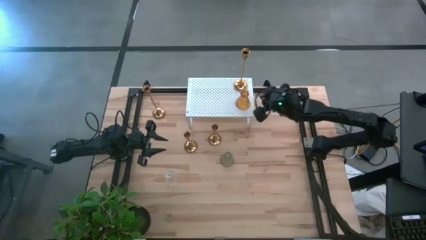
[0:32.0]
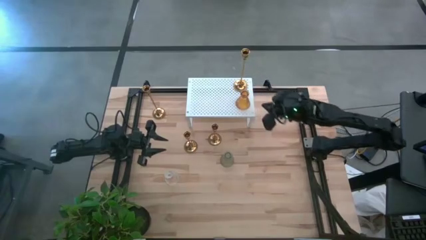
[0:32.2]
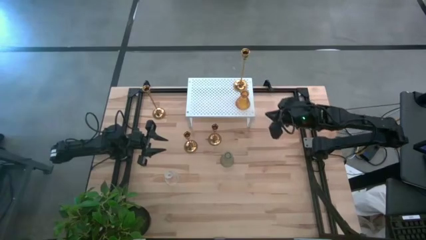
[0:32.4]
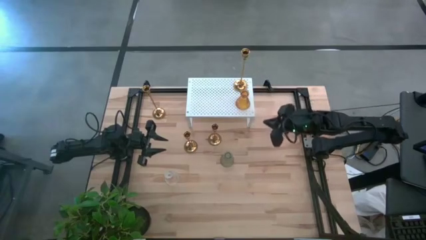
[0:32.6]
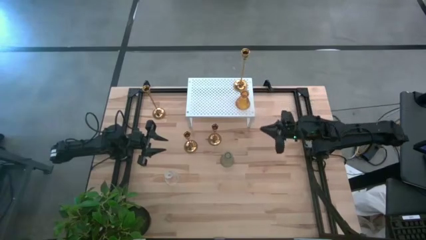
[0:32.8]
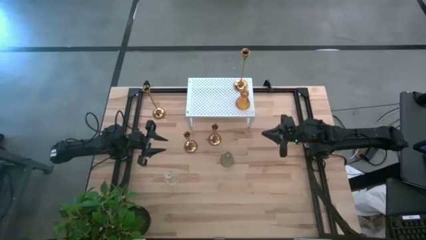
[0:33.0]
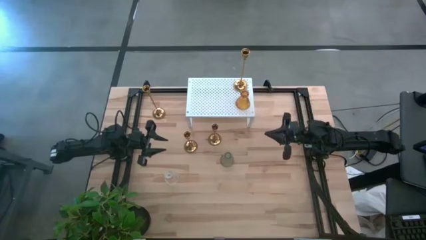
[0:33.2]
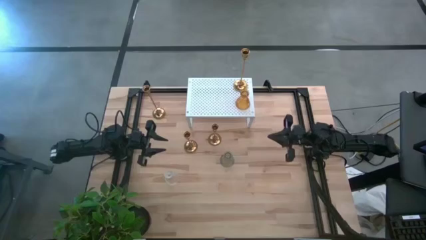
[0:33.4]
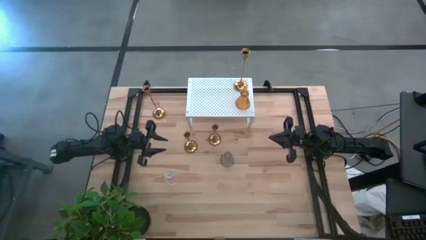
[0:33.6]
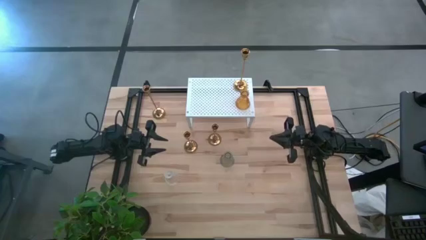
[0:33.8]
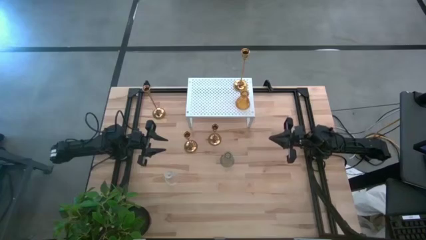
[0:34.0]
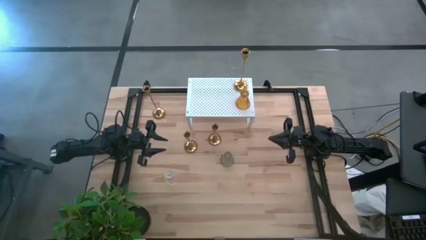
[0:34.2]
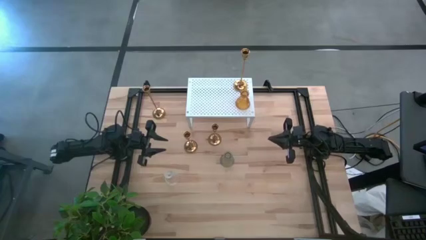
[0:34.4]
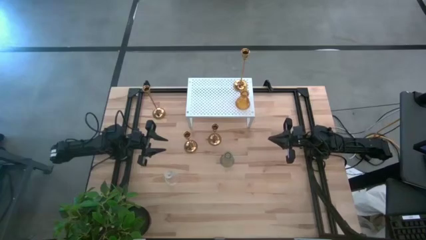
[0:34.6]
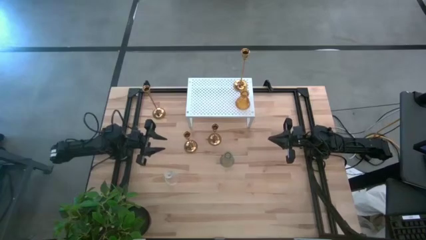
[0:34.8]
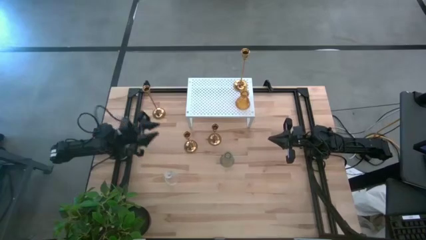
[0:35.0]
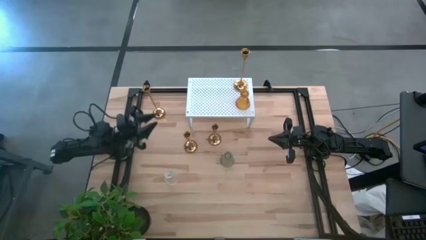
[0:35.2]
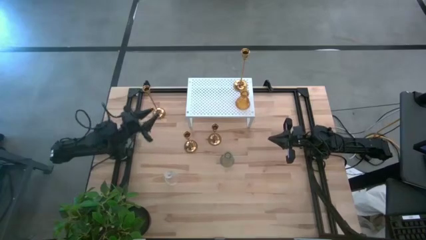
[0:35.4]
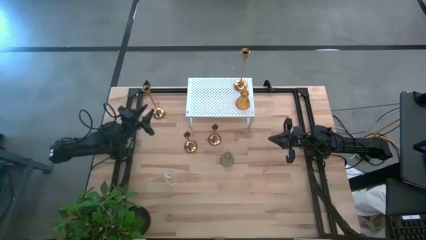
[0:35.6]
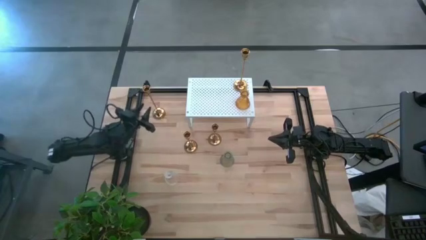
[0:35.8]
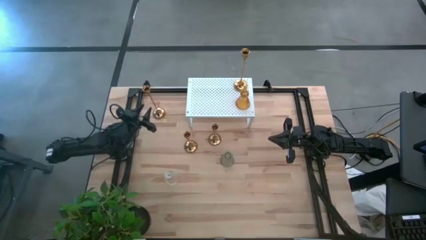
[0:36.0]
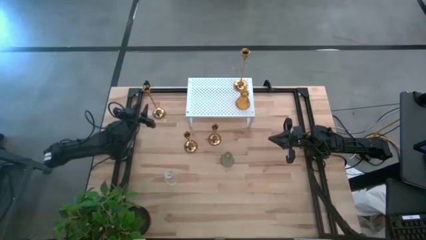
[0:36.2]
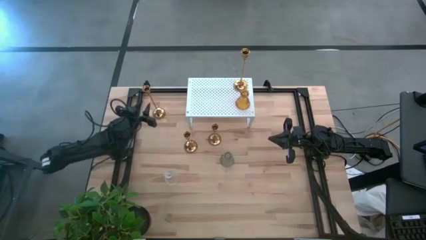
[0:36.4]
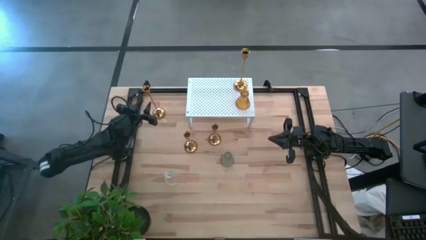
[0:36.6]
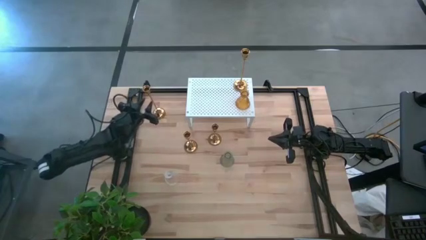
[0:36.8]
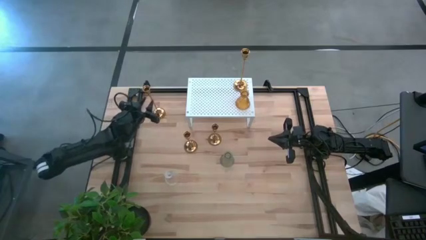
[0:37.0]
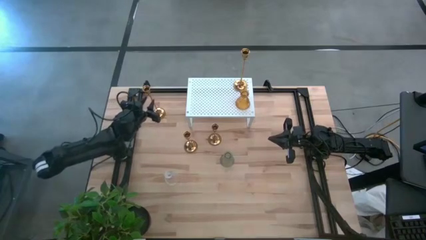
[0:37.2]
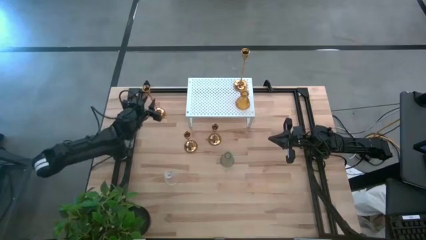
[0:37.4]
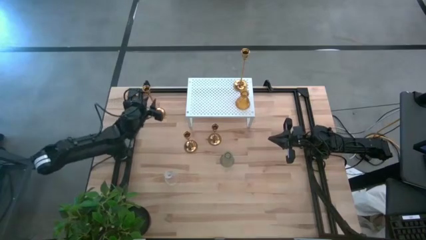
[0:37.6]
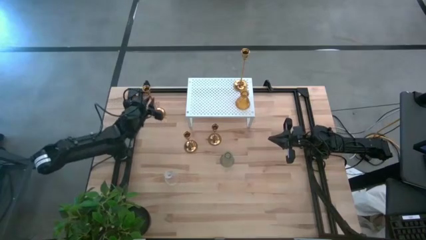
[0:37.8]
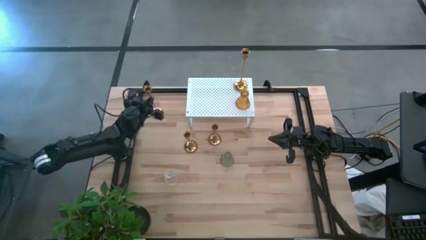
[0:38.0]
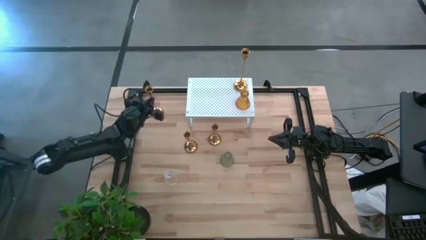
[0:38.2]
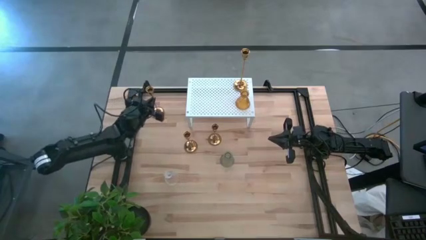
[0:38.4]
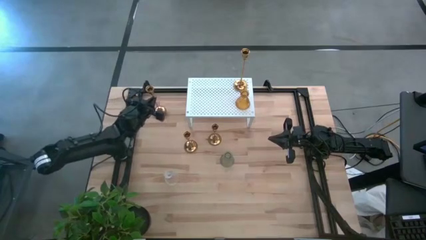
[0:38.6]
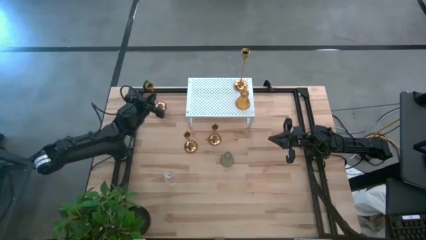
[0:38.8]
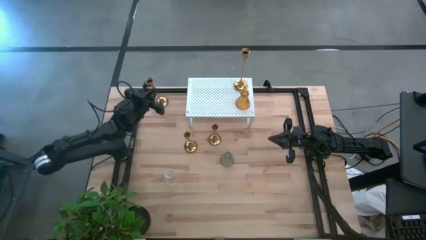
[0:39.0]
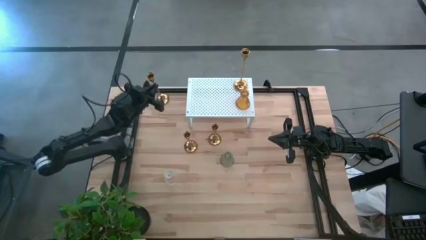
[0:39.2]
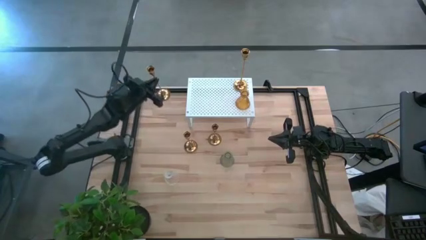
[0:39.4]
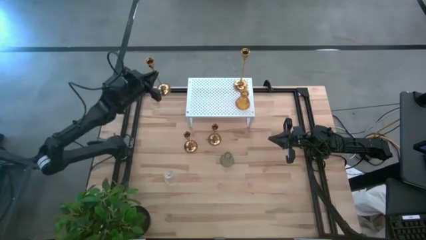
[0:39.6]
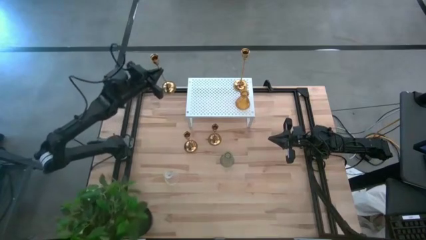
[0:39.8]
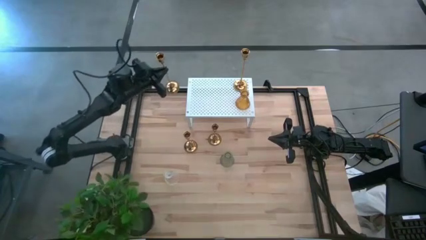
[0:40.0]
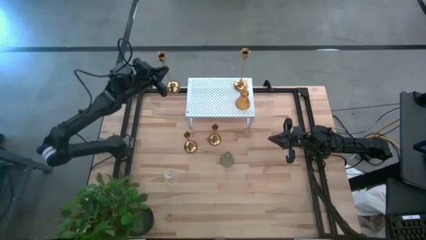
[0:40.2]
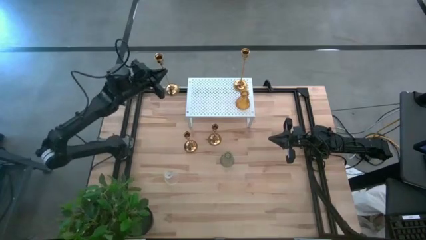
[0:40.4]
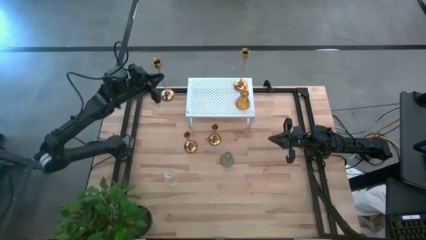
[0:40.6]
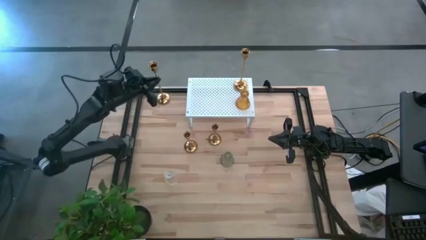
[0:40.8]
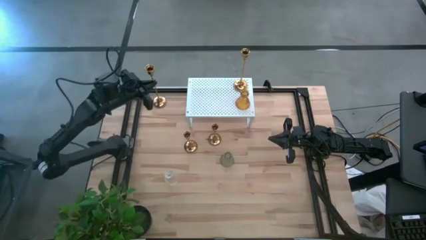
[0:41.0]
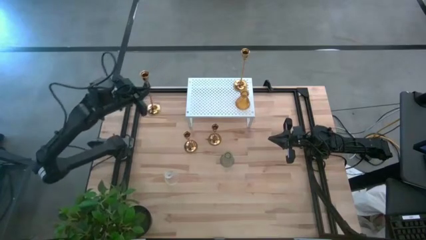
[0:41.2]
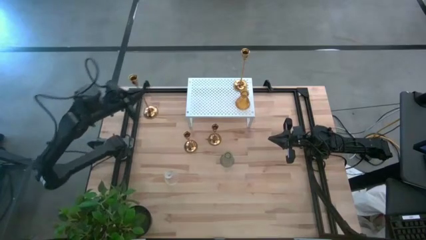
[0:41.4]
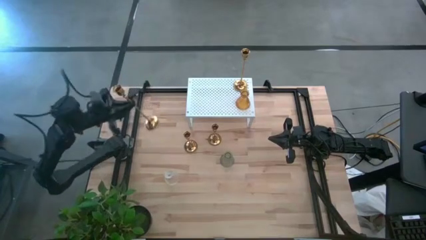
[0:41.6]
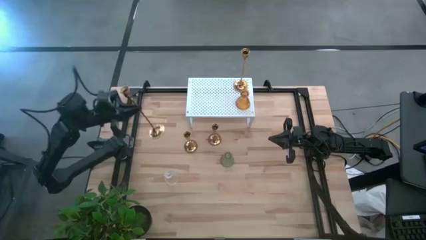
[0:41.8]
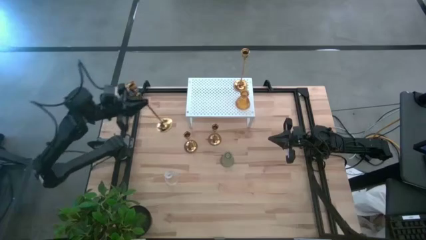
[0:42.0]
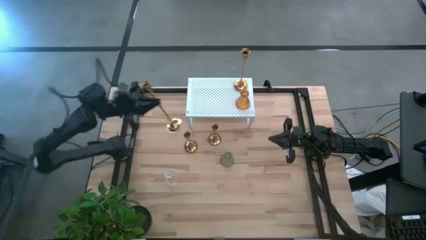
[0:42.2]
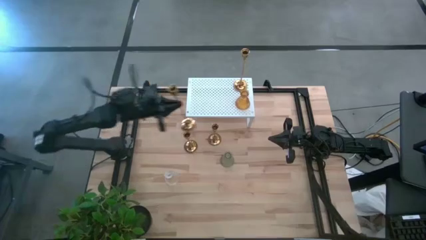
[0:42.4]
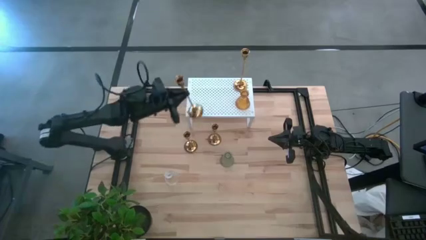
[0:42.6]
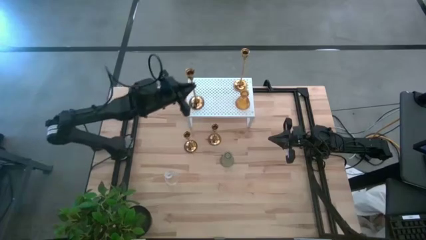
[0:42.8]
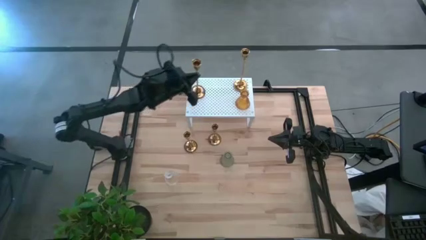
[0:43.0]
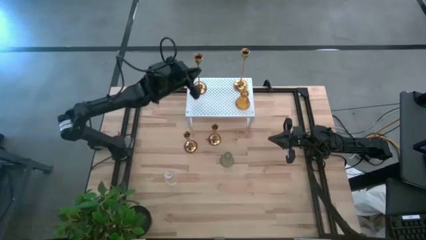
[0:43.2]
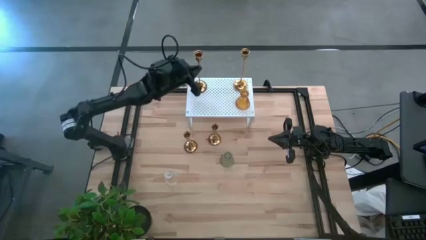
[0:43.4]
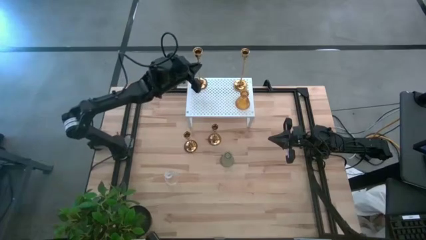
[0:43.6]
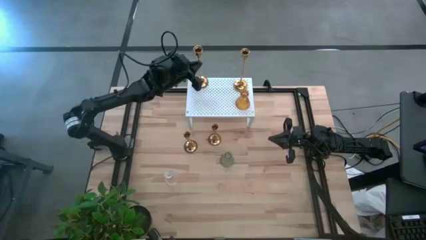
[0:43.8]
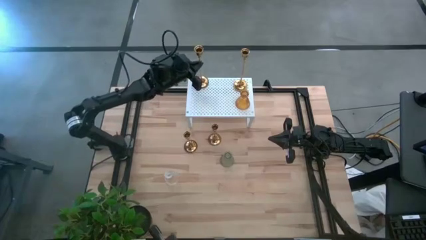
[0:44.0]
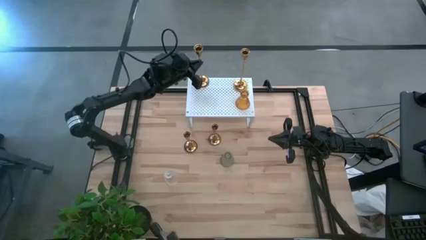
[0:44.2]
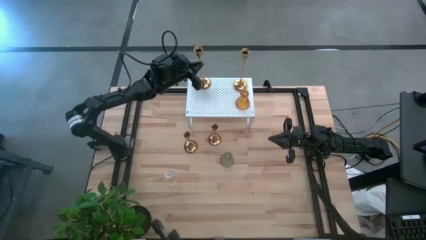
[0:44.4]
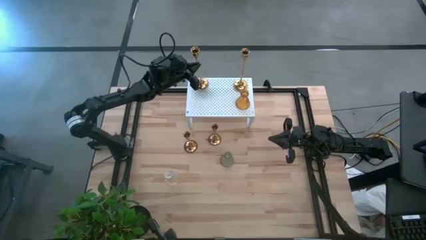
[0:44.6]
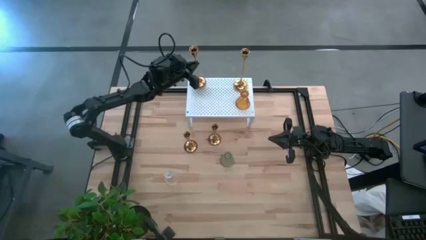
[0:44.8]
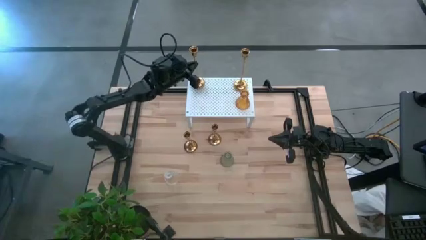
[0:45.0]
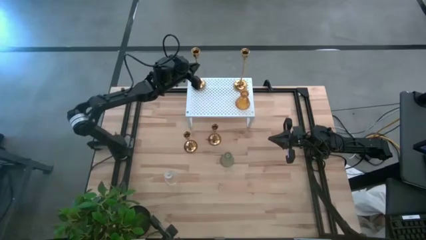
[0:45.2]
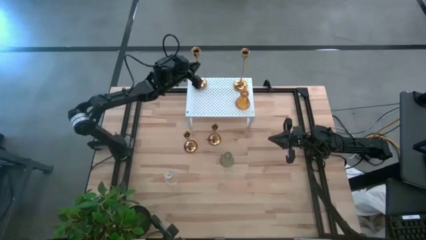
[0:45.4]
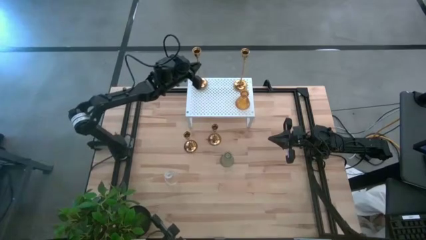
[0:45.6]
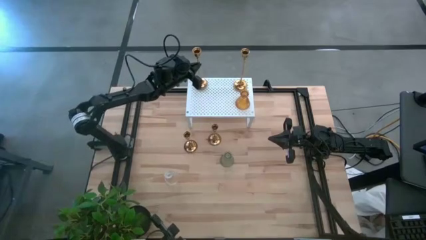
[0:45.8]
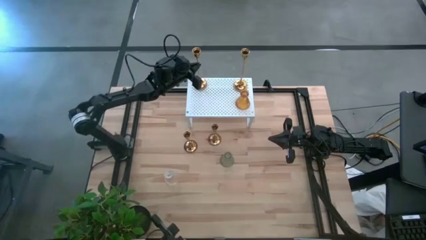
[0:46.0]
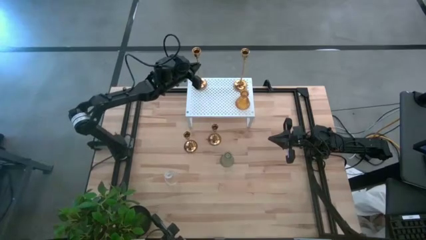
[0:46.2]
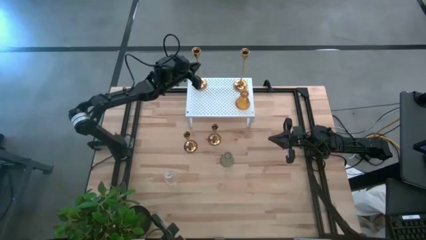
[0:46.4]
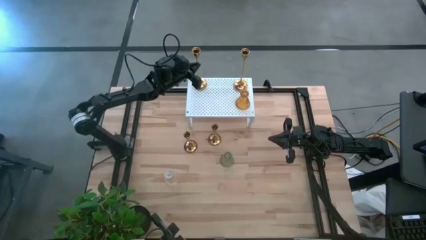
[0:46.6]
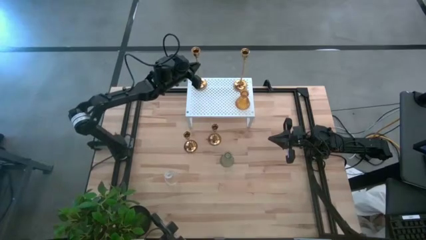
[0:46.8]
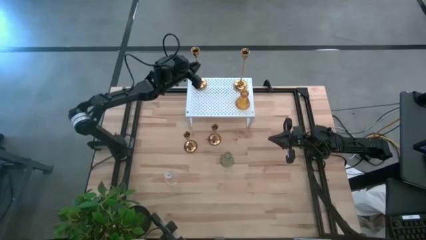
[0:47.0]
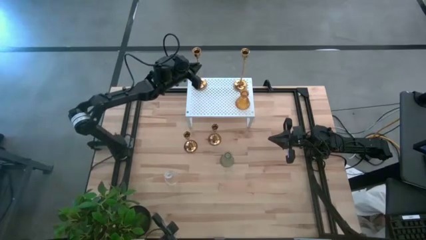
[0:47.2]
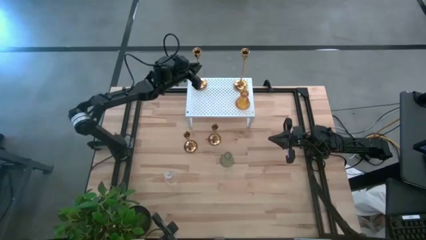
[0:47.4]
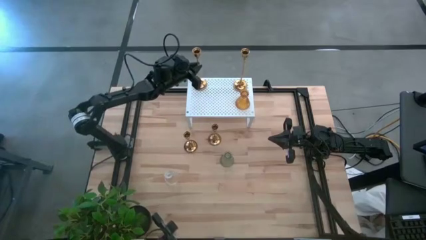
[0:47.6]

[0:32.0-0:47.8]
Task: Pick & Place candle stick holders
Put the large gold candlestick on the shelf
